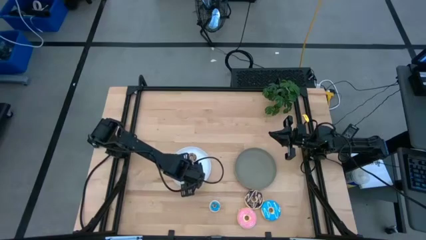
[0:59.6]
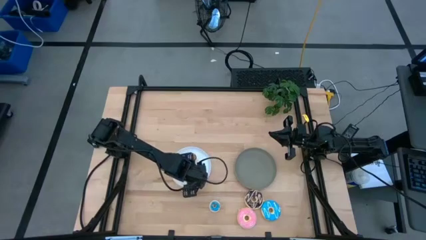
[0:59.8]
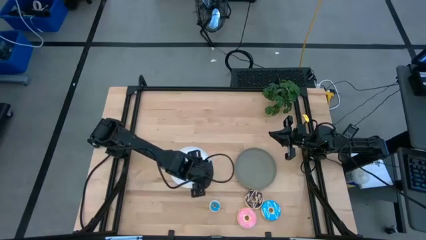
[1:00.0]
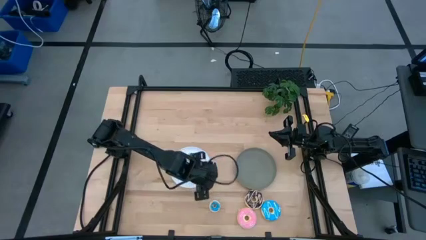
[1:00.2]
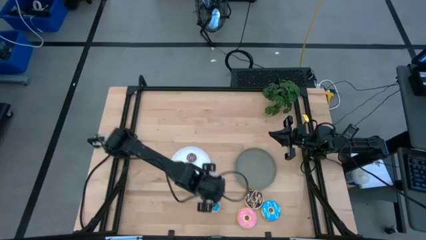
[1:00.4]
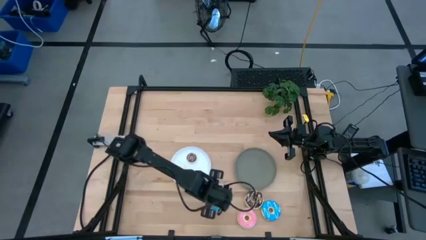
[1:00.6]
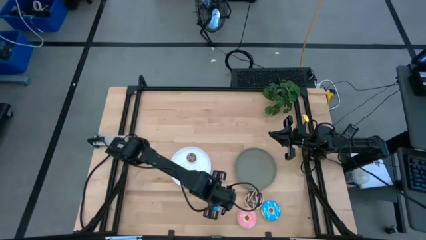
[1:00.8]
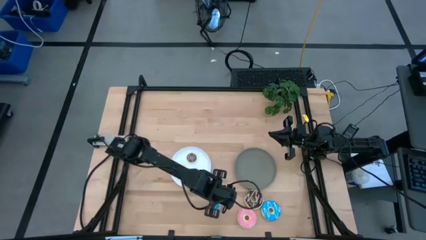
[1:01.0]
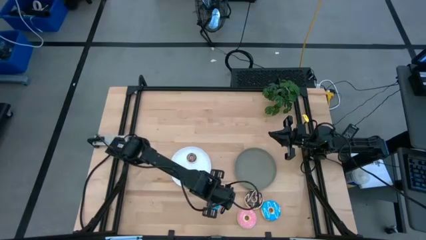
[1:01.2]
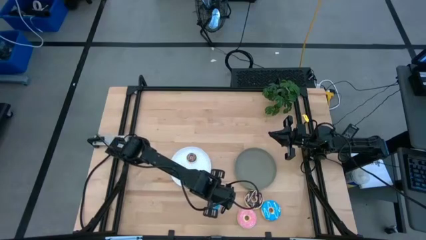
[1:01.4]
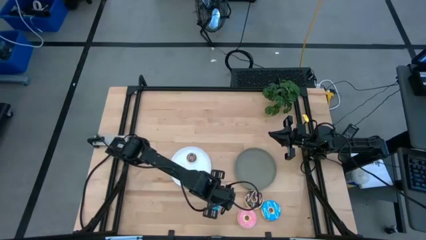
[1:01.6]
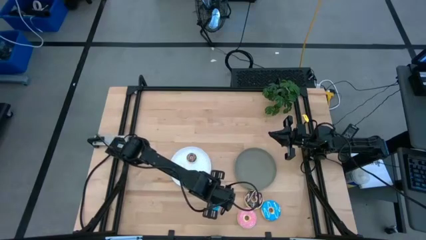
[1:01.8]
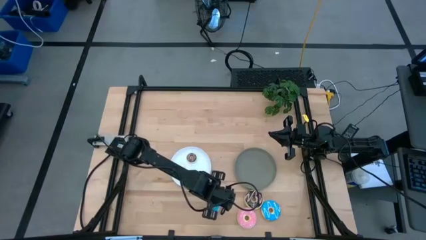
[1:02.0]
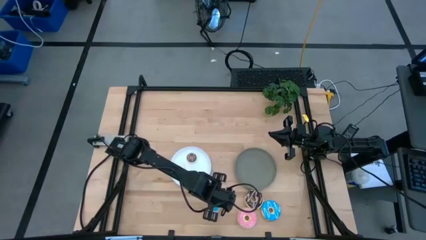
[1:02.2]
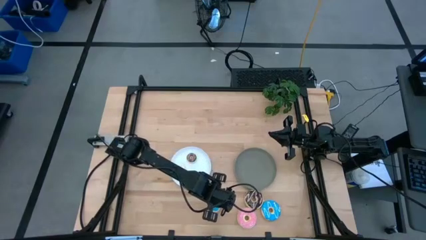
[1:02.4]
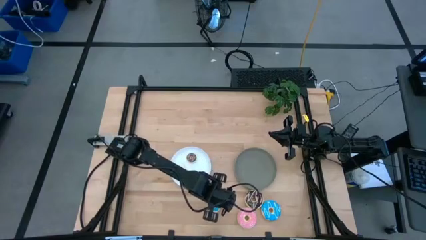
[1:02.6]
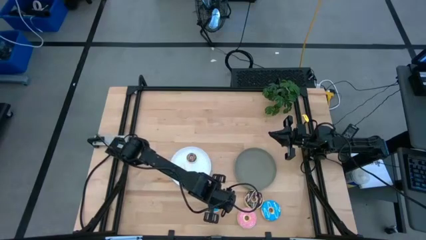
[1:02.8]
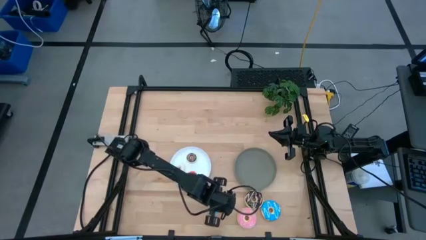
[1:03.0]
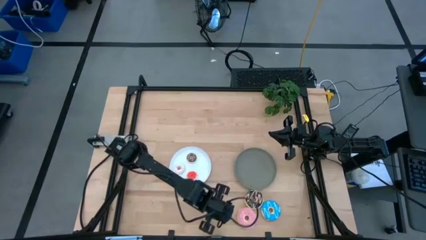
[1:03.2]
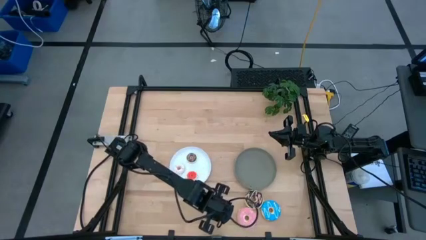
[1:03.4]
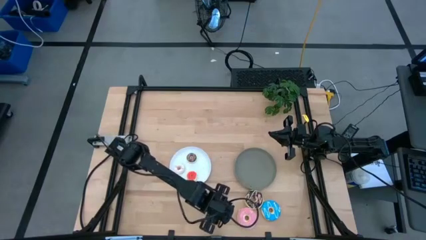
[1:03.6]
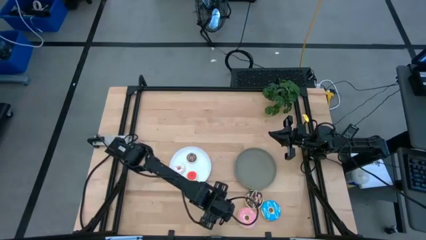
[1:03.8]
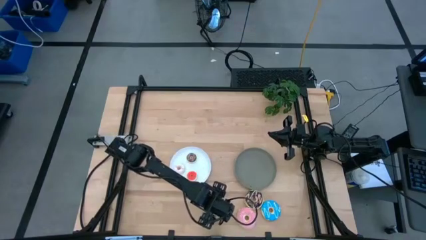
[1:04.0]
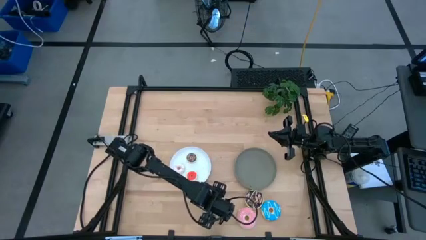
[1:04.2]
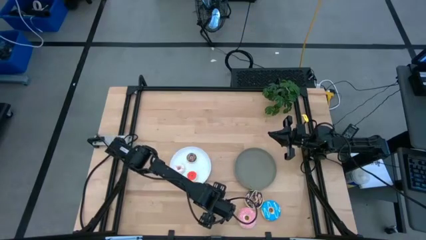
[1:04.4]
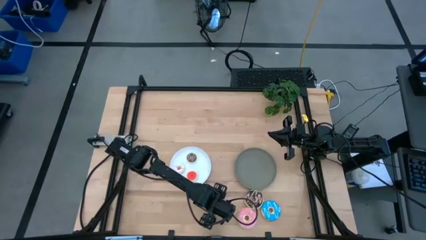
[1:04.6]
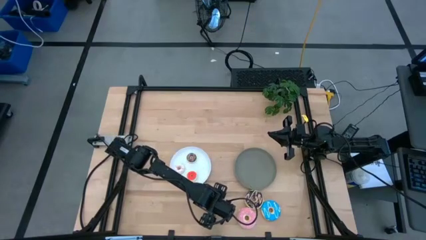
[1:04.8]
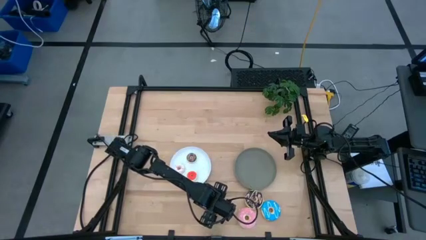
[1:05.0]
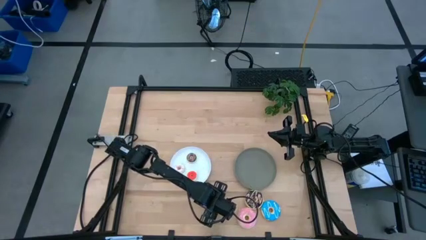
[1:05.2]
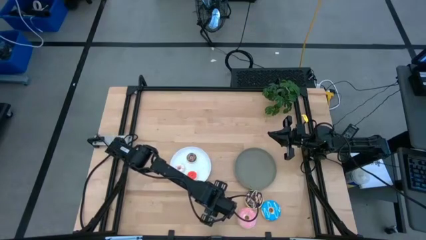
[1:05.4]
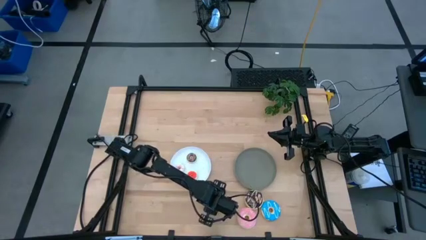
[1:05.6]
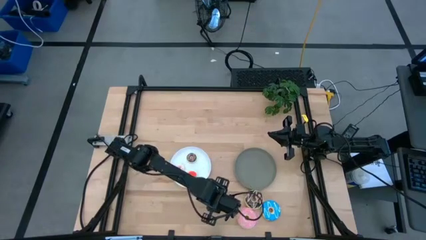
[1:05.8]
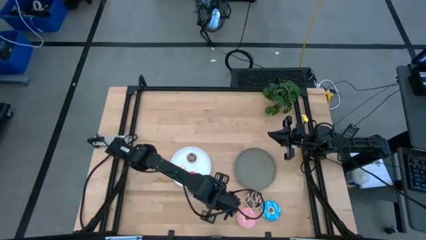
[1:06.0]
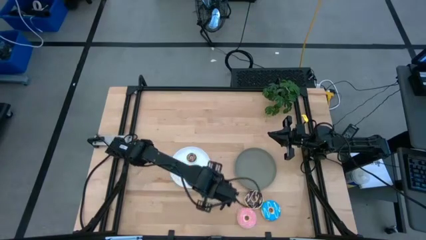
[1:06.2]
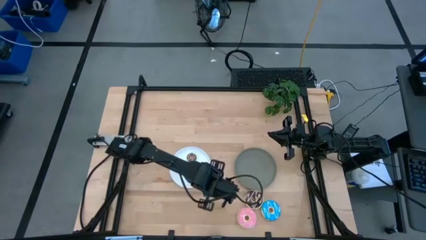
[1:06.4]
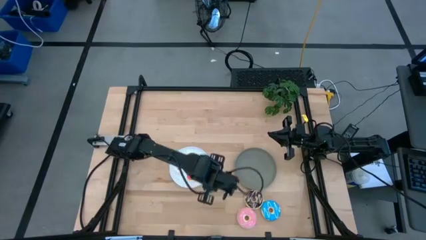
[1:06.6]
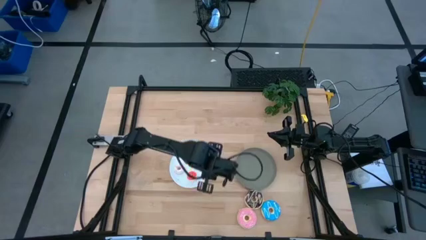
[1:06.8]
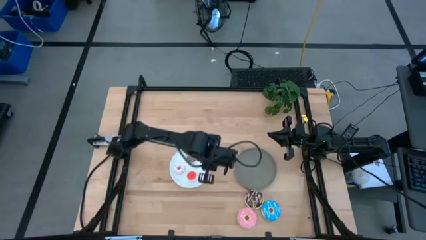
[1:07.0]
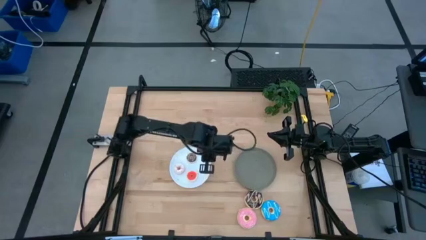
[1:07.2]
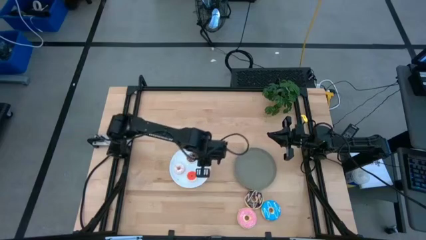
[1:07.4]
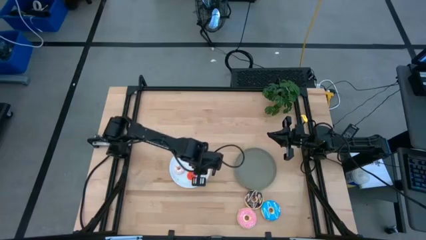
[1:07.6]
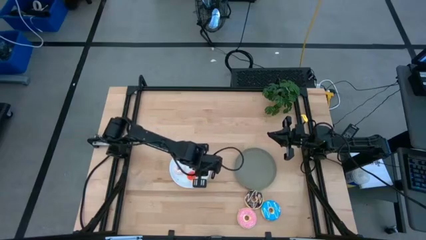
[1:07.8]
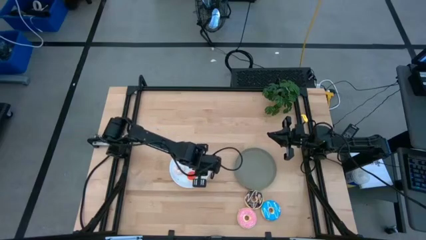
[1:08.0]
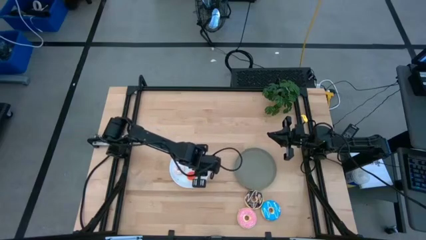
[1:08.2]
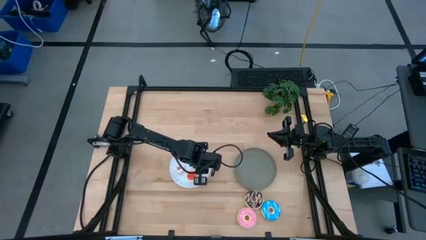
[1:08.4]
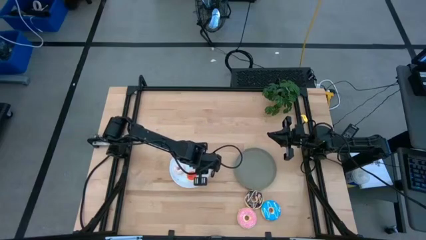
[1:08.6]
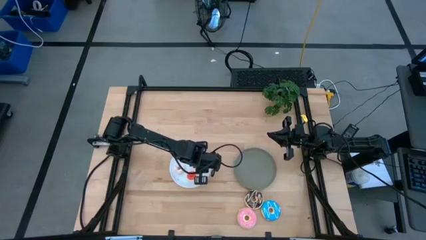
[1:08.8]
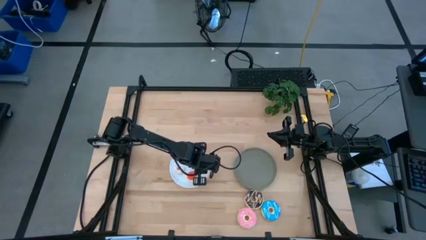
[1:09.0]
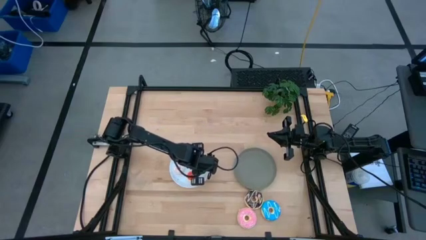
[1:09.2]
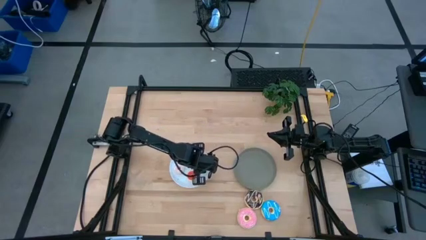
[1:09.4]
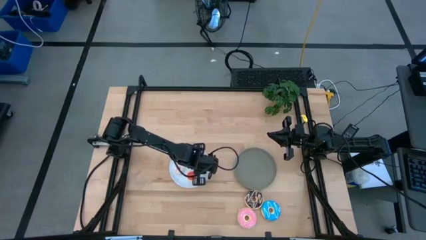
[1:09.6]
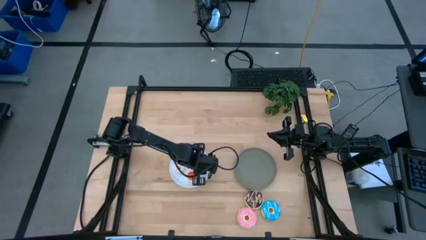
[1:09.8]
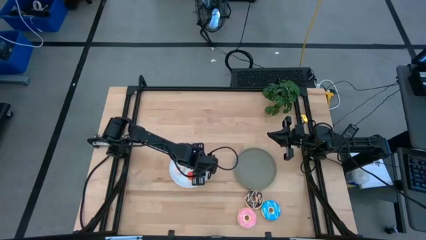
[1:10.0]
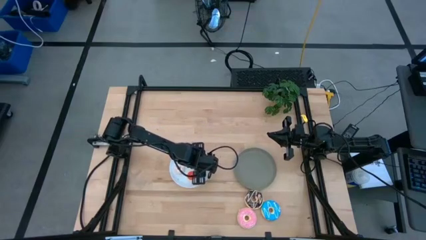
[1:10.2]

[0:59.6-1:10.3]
Task: Pick & Place donuts
Put the small blue donut on the white plate

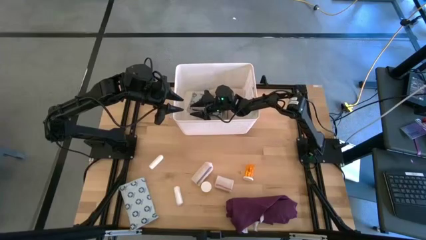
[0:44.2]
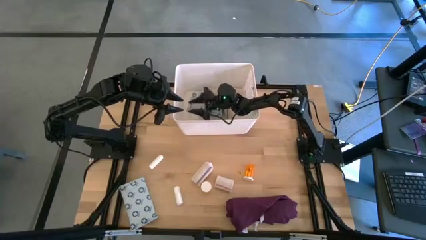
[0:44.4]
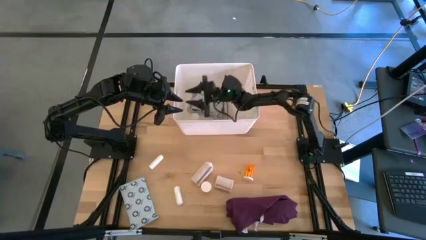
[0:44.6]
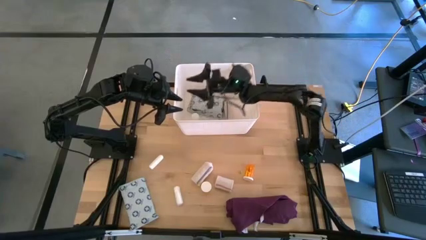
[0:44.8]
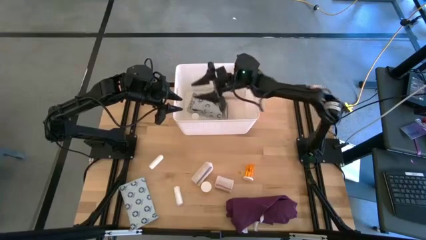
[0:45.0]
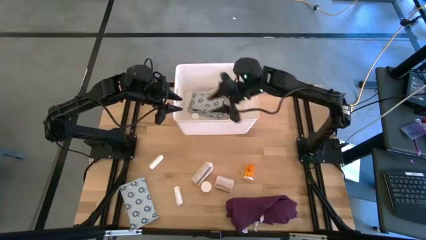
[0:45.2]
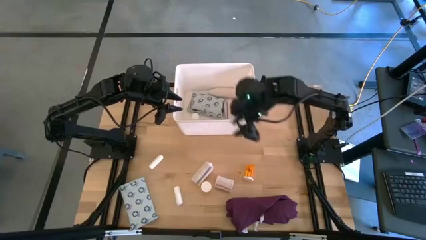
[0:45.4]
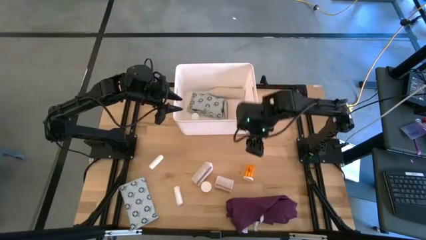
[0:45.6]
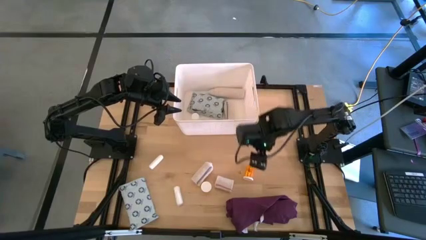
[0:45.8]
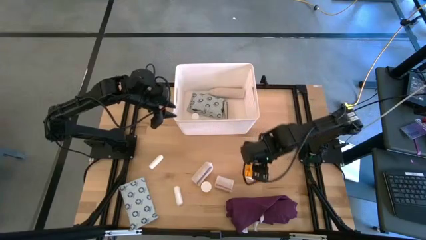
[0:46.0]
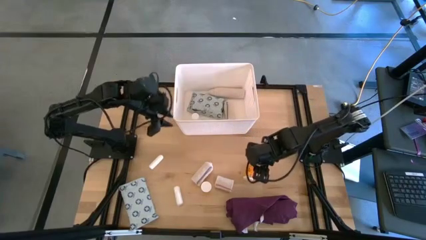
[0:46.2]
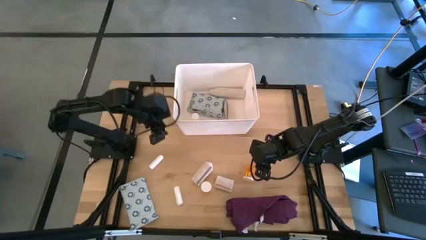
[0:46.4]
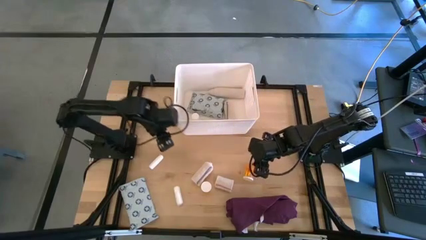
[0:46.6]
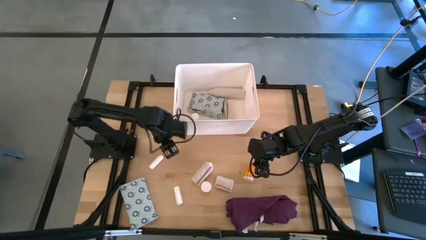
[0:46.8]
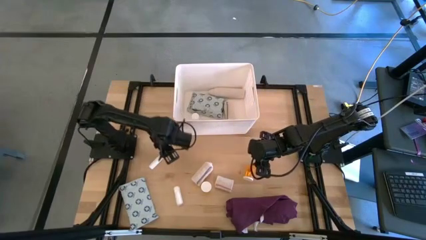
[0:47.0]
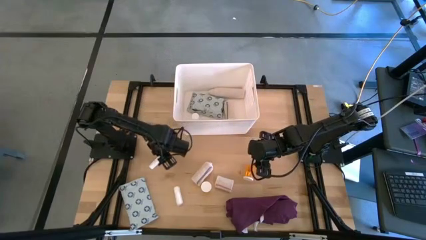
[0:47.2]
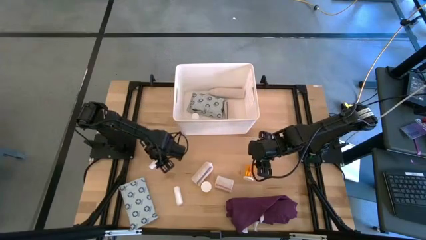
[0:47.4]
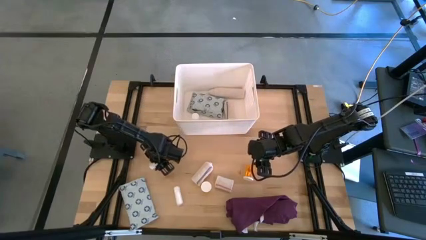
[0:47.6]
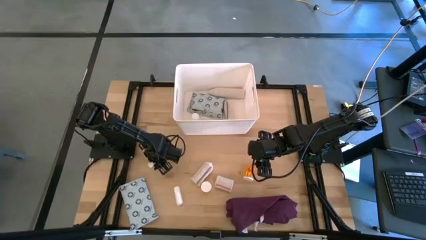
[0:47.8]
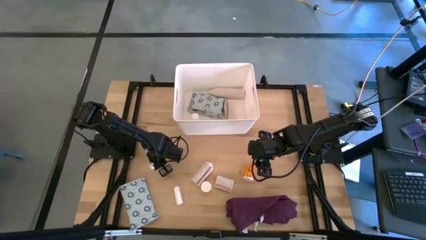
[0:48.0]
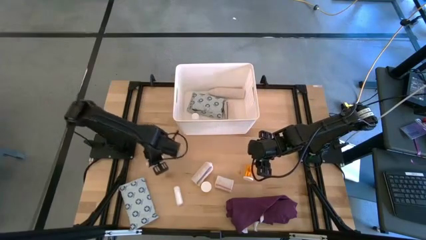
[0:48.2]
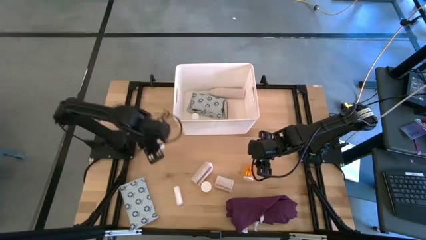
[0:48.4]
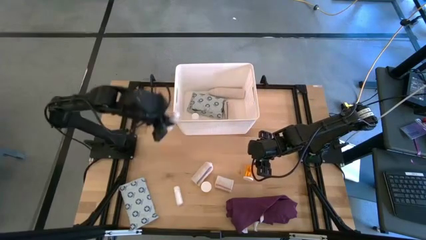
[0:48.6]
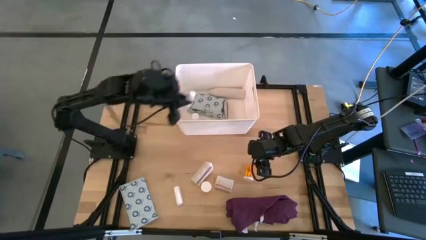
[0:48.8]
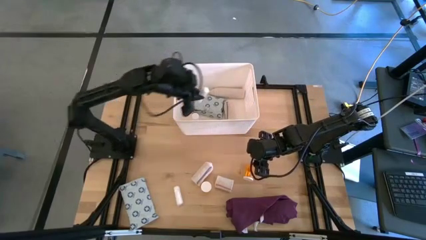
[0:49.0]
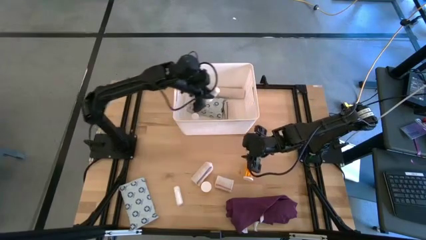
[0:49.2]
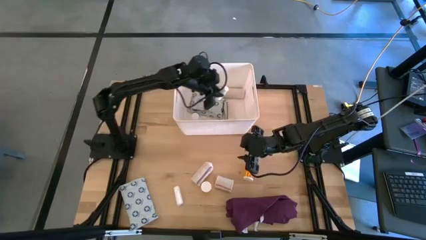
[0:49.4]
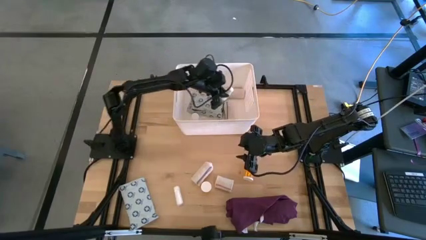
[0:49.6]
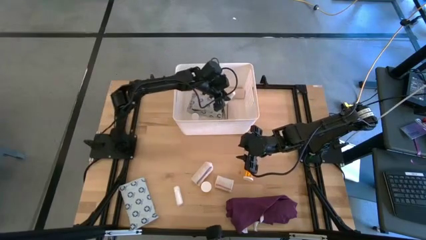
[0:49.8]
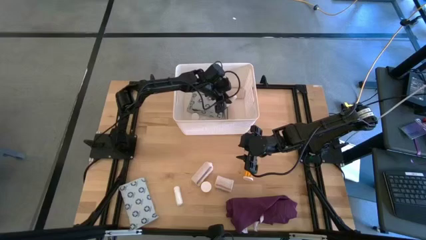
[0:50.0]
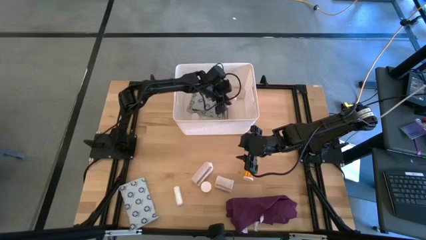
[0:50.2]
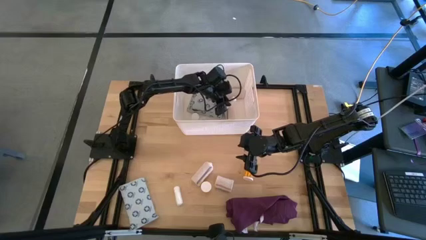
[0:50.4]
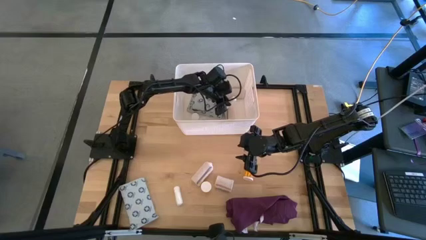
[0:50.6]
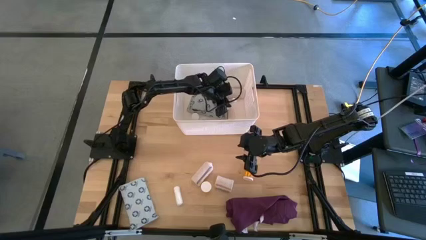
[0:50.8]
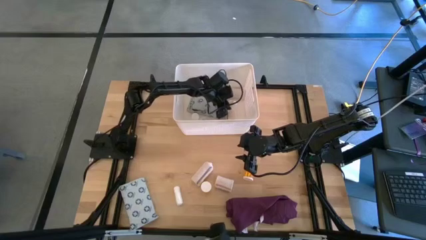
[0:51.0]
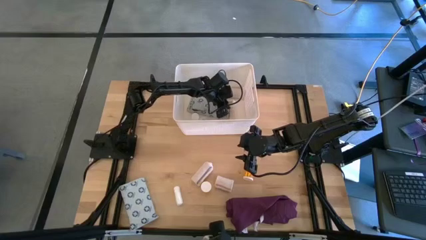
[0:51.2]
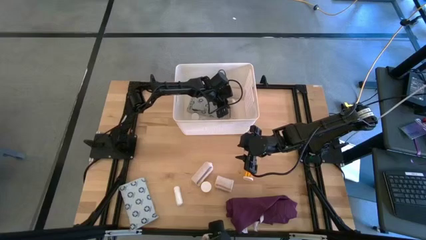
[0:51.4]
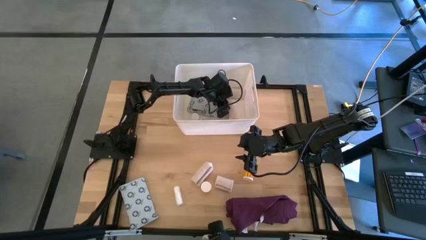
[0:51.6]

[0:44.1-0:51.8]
Task: Pick & place medical supplies in basket/bin
Put the top white rolled gauze into the white bin
